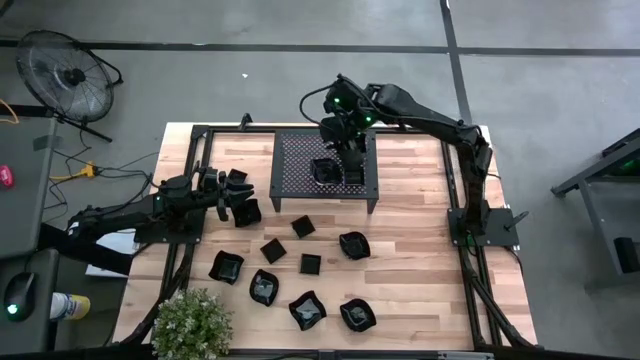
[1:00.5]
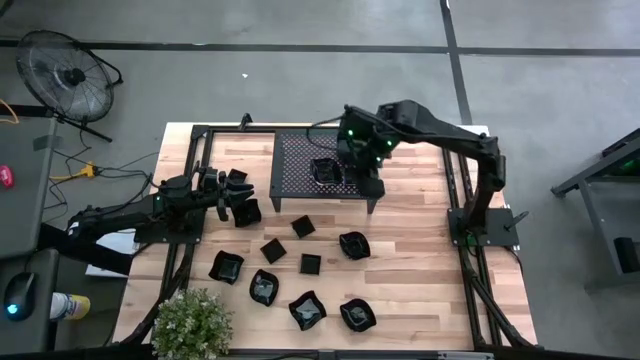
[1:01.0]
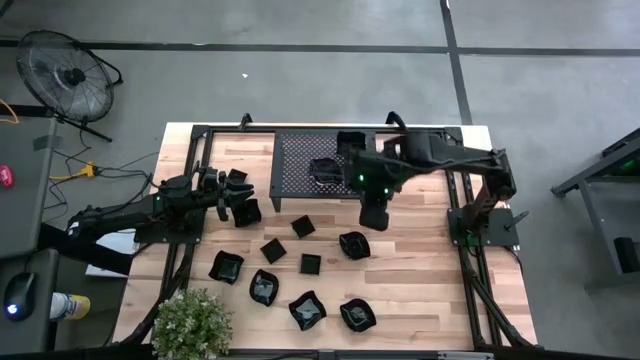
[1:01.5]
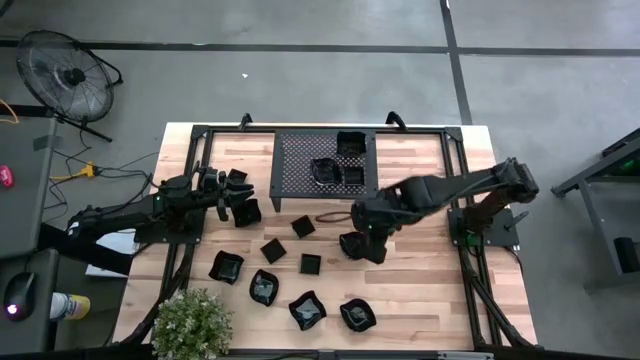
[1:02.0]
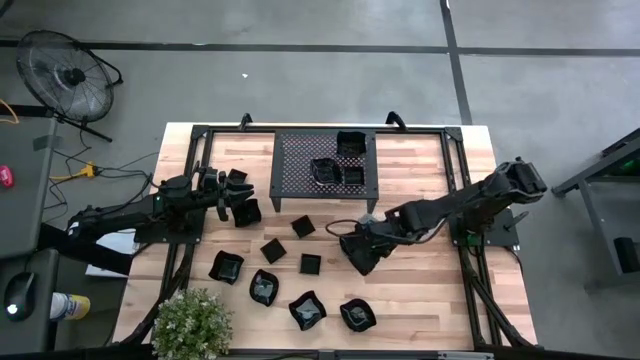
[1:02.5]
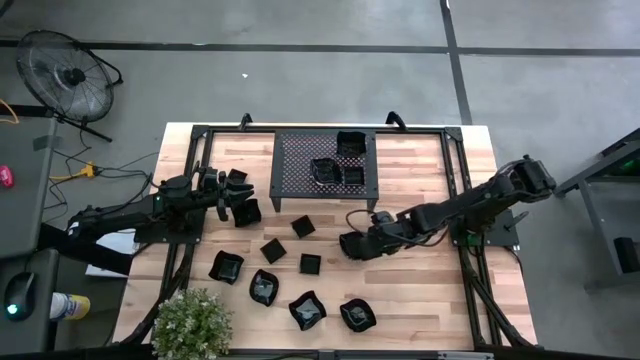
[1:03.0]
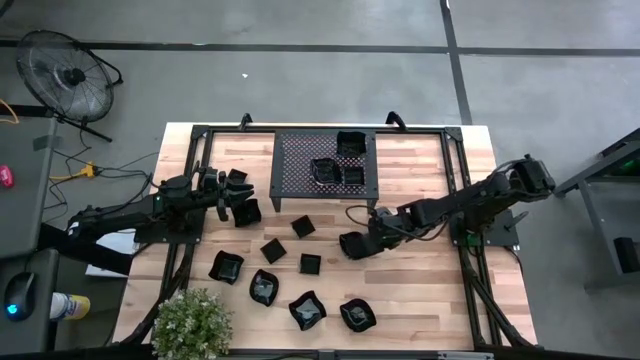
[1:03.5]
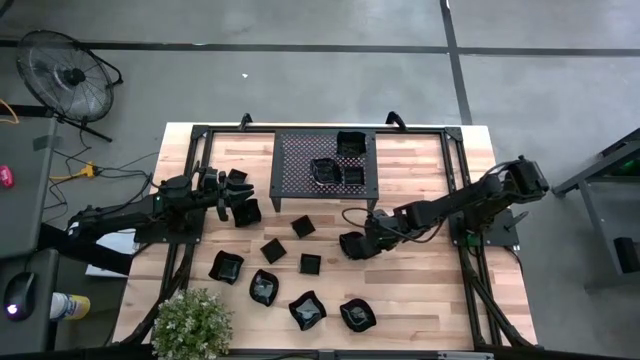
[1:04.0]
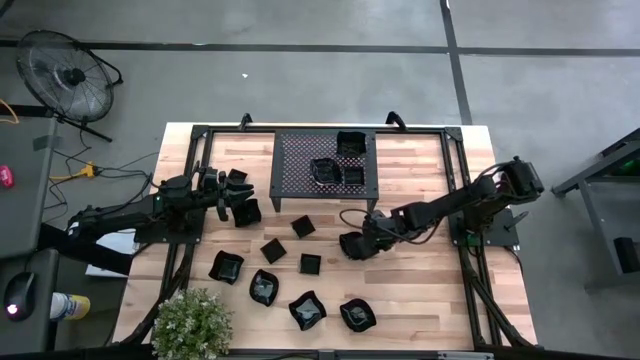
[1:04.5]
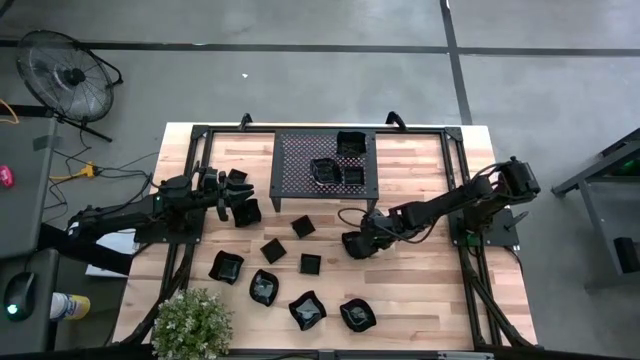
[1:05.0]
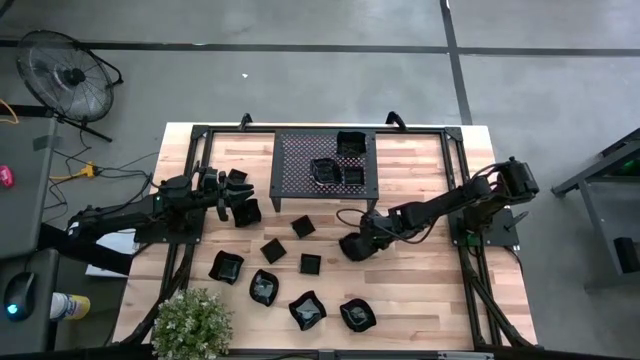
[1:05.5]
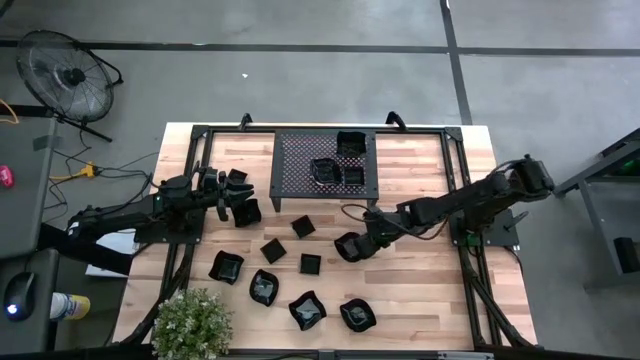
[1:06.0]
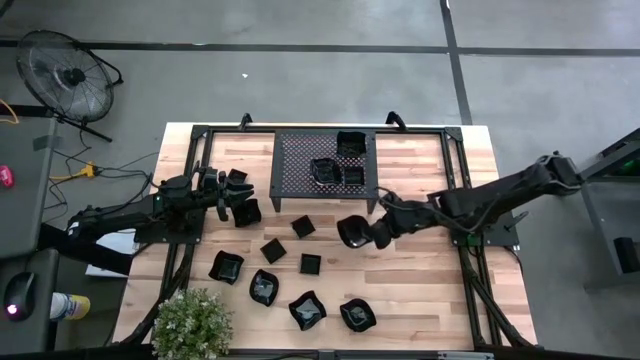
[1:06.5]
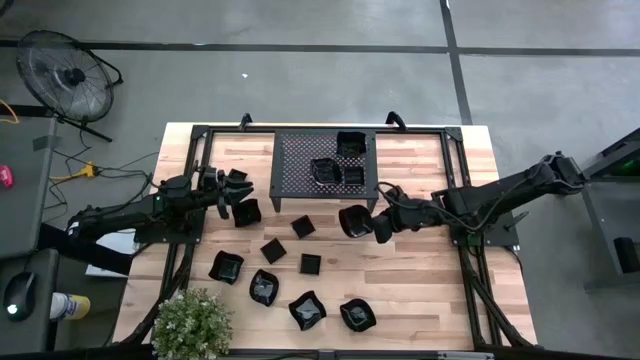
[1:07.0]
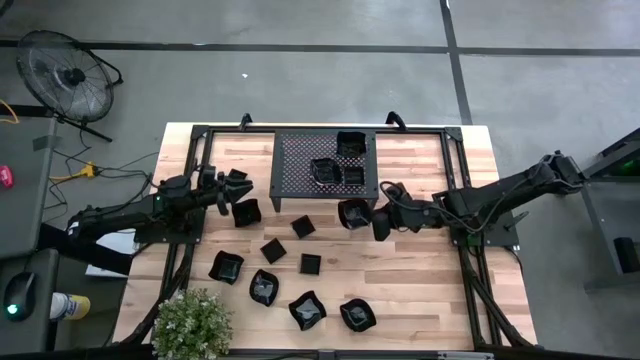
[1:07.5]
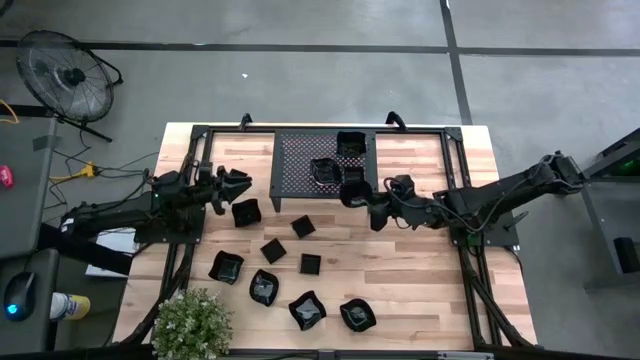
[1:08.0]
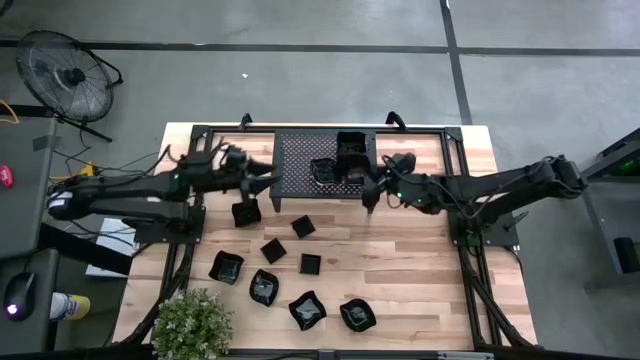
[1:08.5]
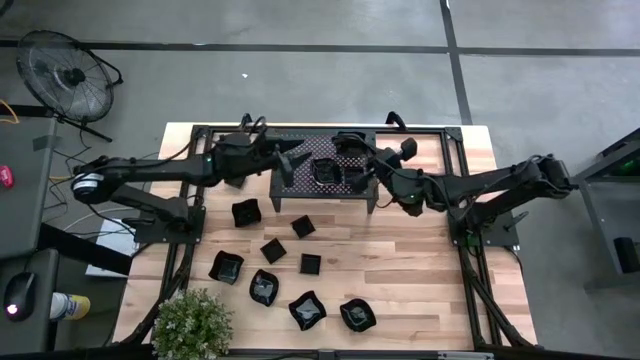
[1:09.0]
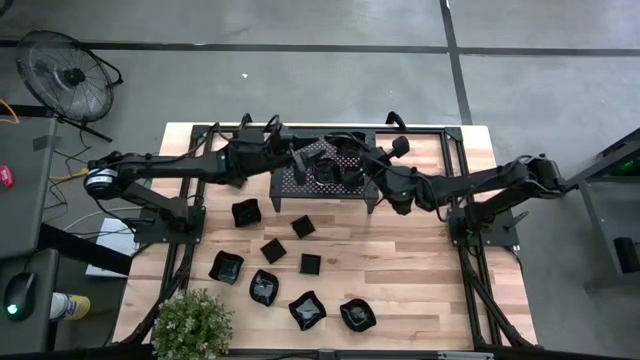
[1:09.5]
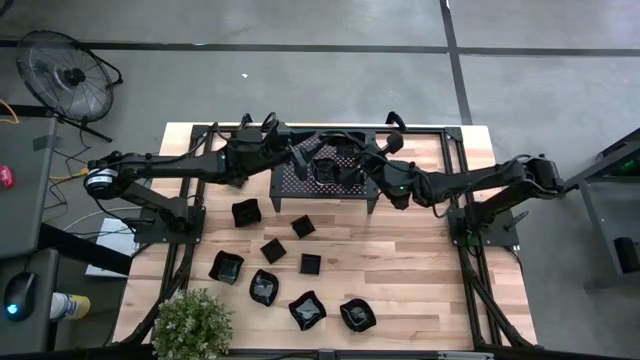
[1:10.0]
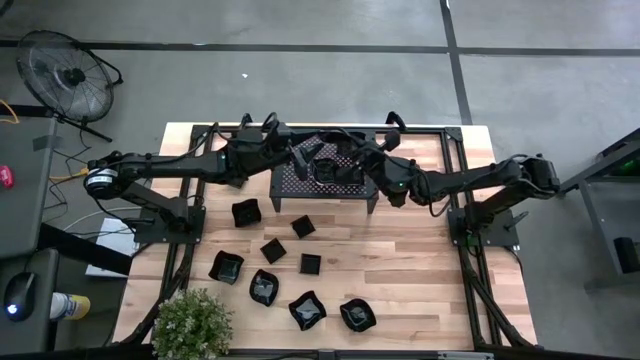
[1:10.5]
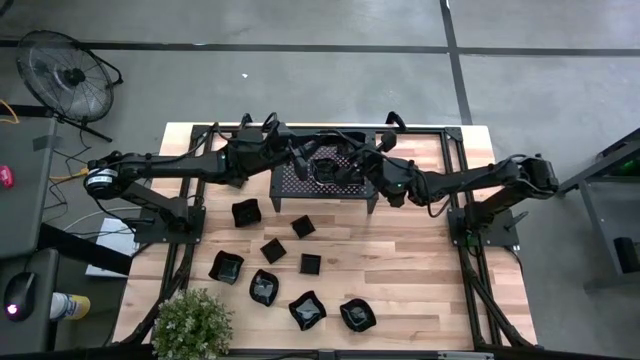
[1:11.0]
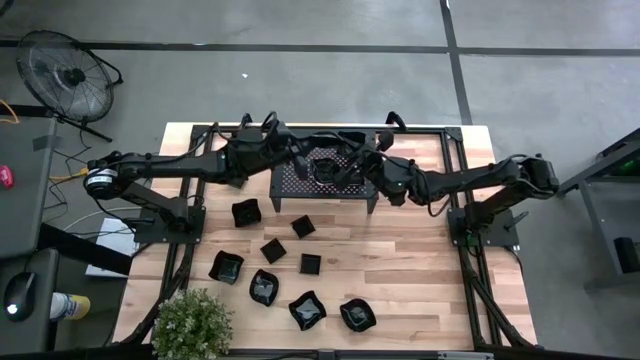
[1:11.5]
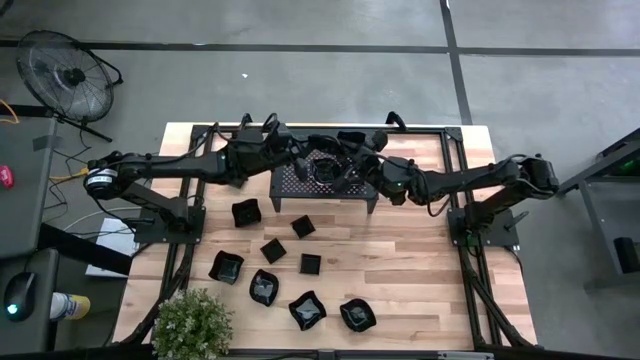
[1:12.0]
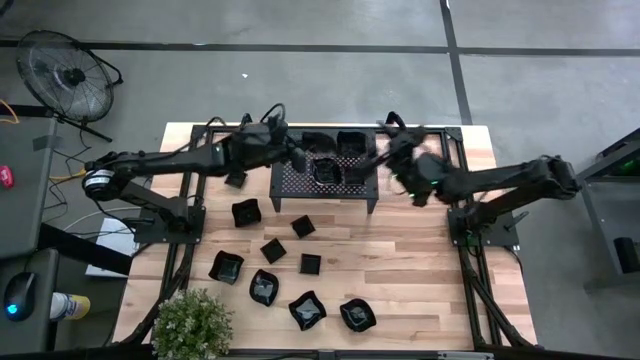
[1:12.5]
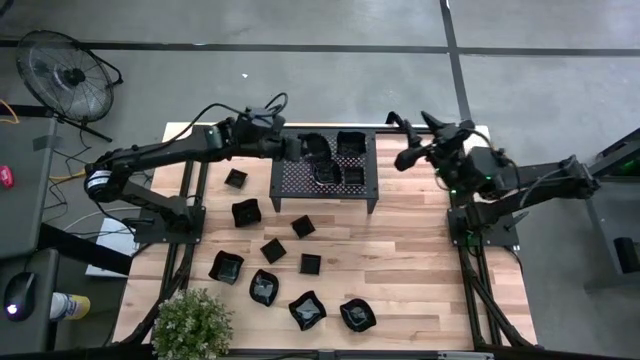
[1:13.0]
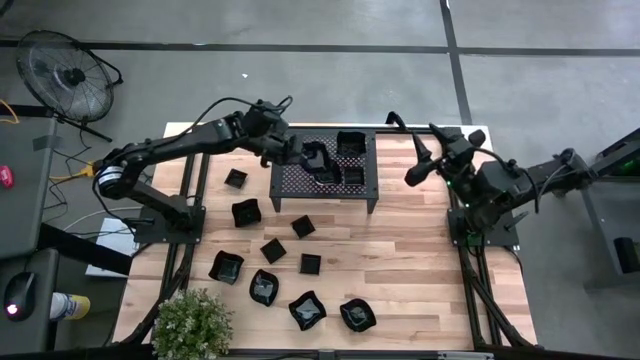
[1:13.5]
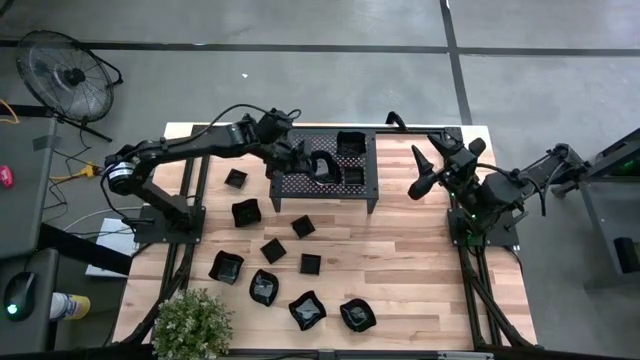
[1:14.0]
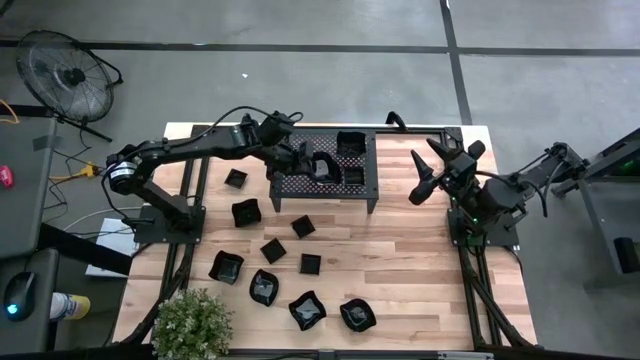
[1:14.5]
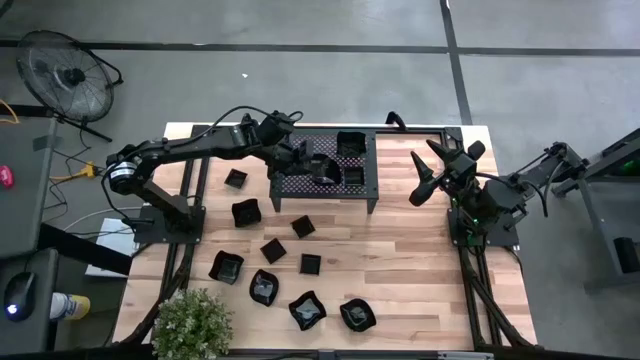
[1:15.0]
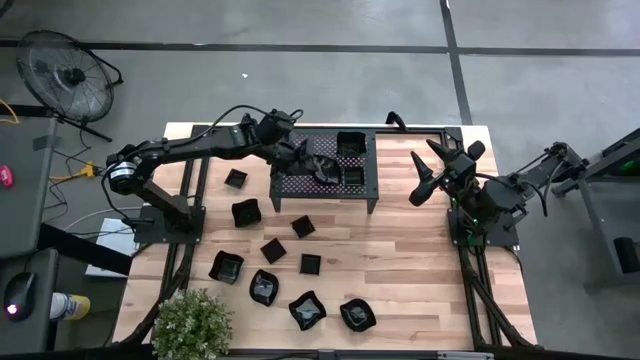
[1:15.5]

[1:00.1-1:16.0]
Task: Pick & Place Mini shaped plates
Stack the black leaf-shaped plate on top of the other black leaf-shaped plates on the shelf

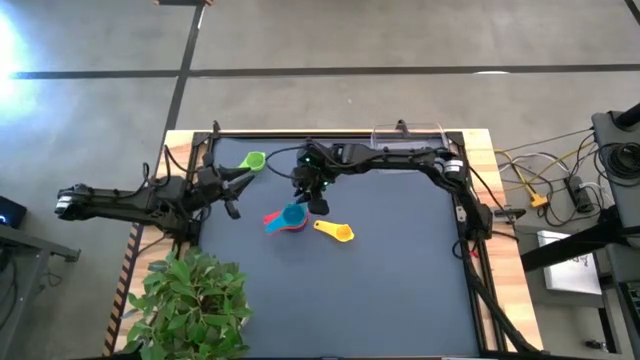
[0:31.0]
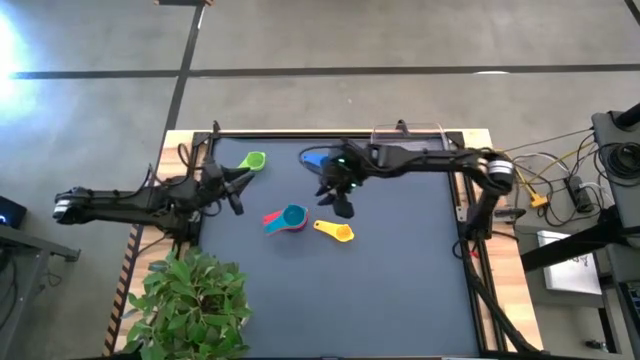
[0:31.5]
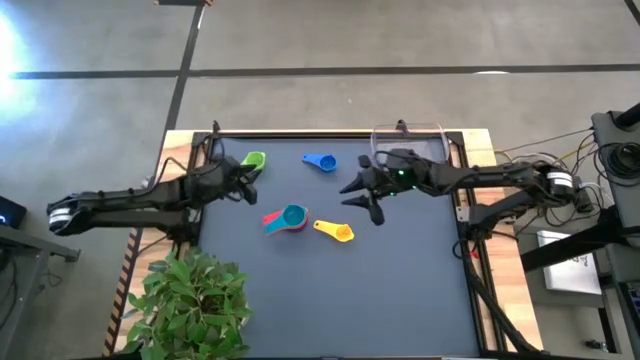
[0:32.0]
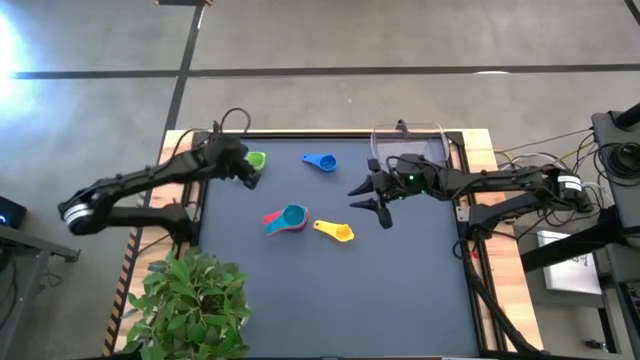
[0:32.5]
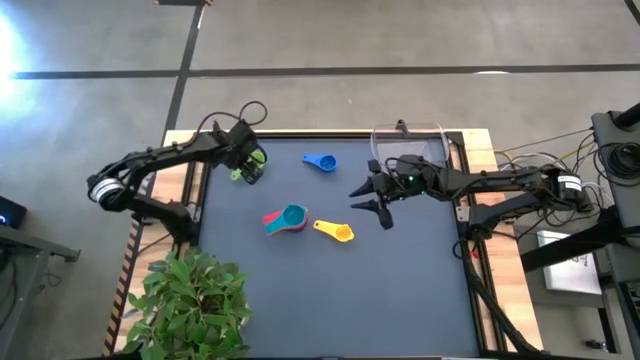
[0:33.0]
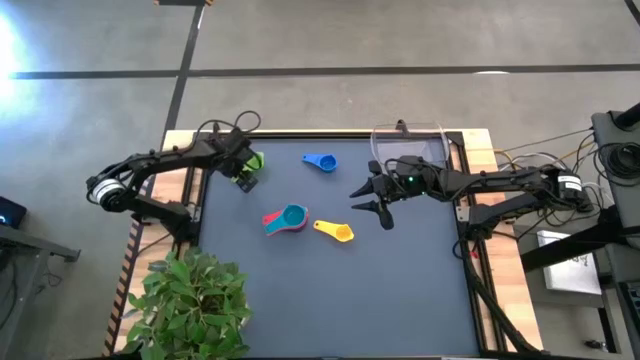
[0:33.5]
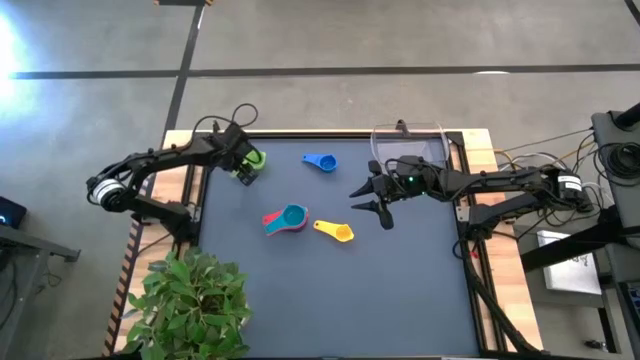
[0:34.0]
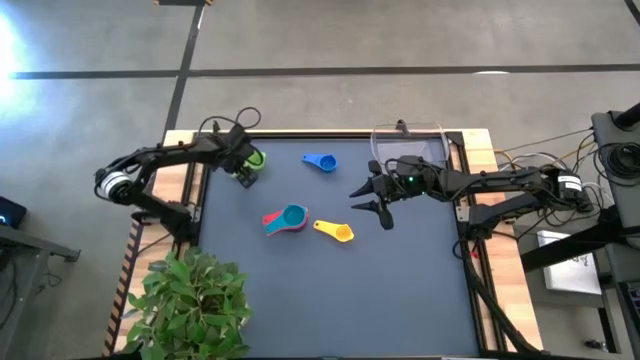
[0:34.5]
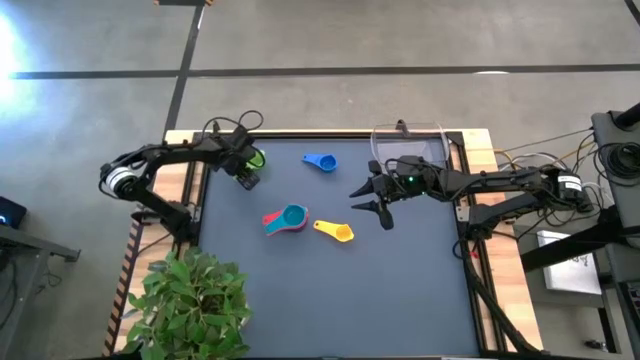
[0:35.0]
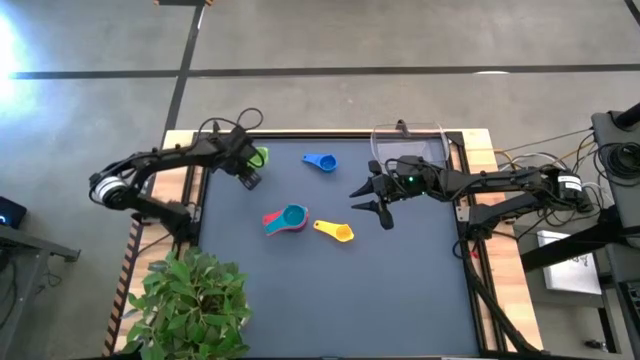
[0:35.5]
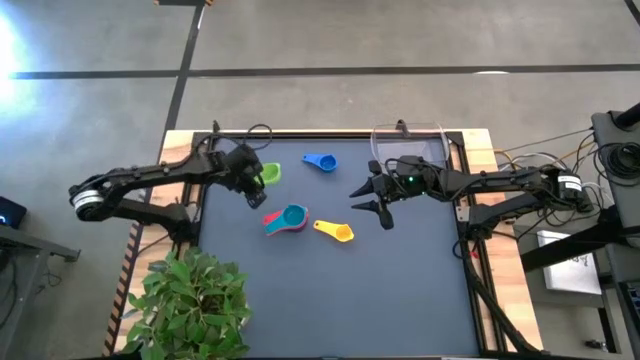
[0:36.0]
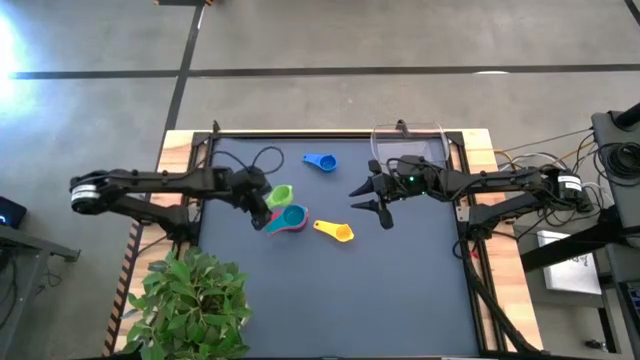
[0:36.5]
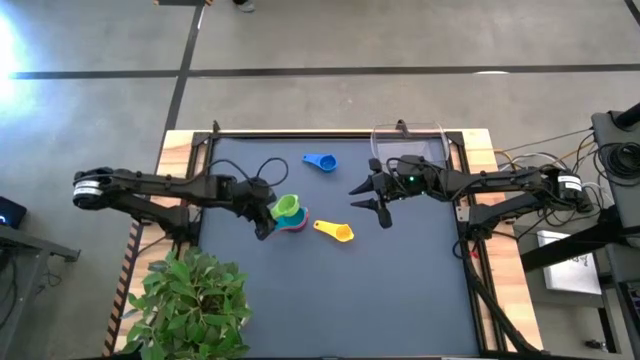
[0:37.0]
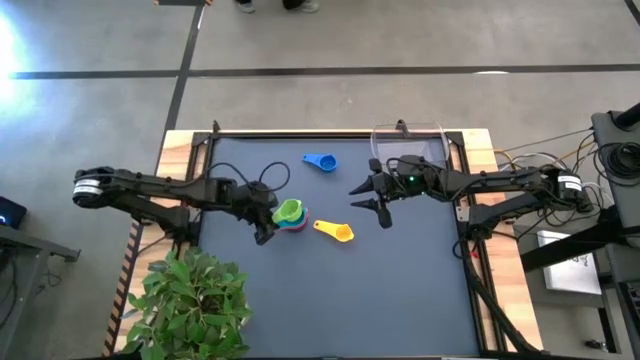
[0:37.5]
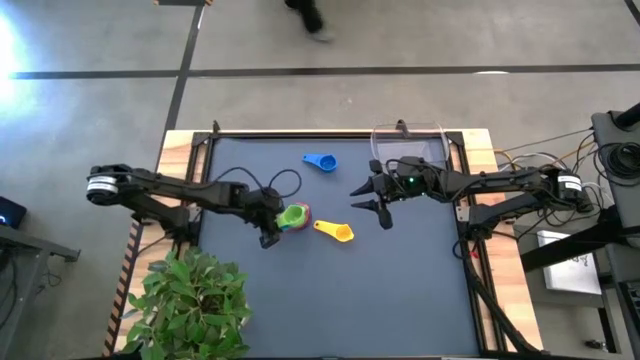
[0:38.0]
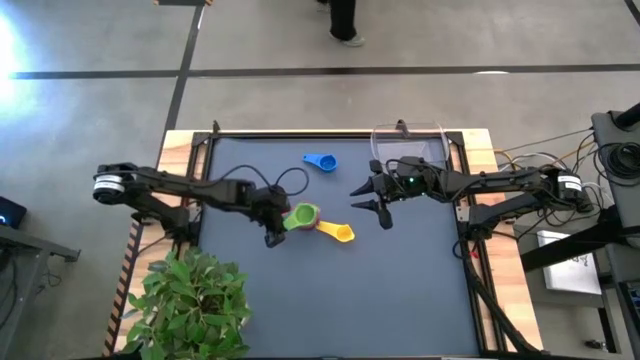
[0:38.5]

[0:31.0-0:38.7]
Task: Nest measuring cups in basket
Stack the green measuring cup on top of the light blue measuring cup
